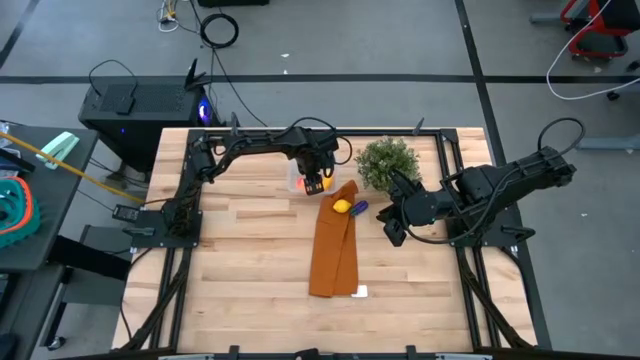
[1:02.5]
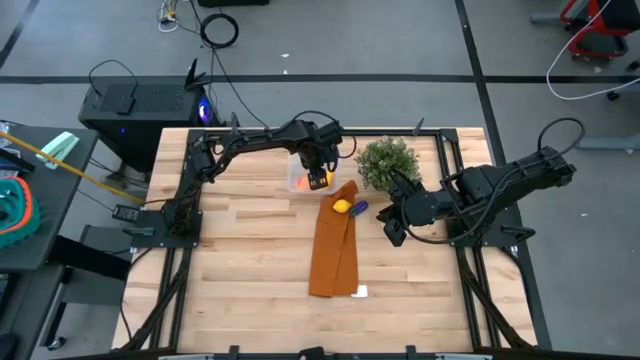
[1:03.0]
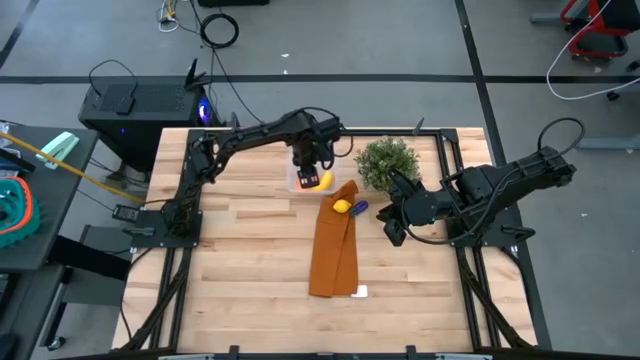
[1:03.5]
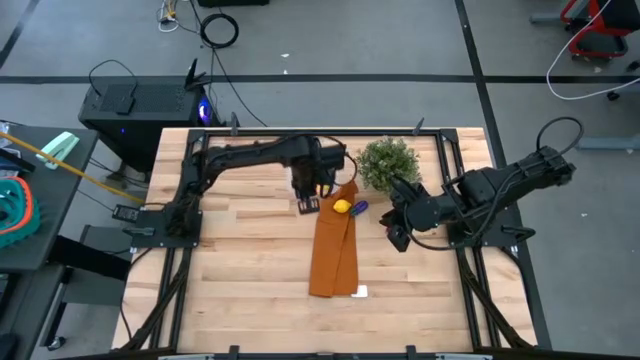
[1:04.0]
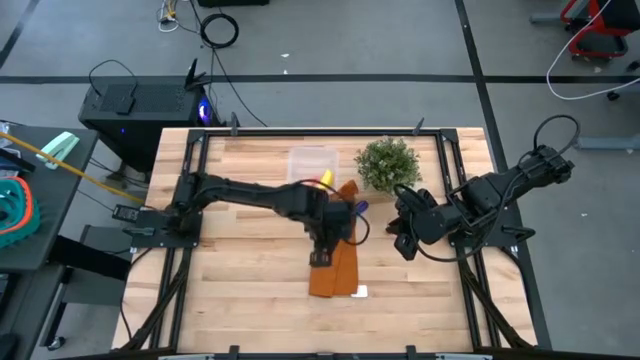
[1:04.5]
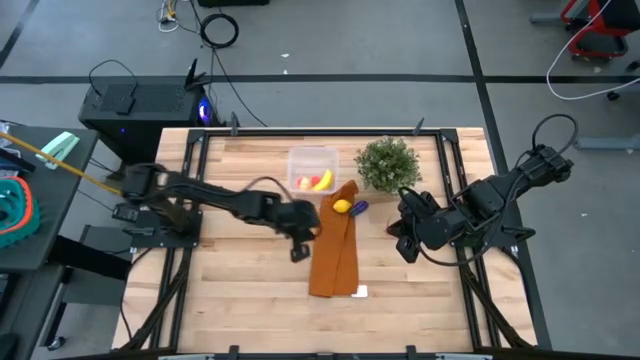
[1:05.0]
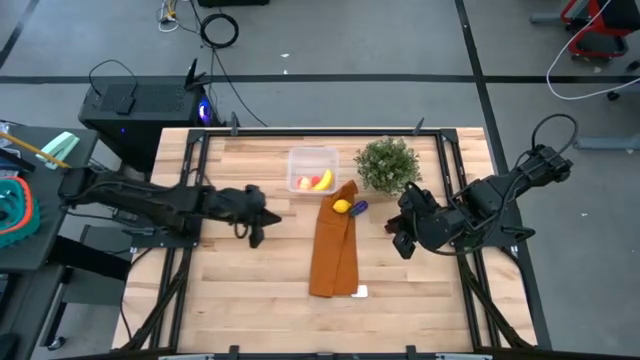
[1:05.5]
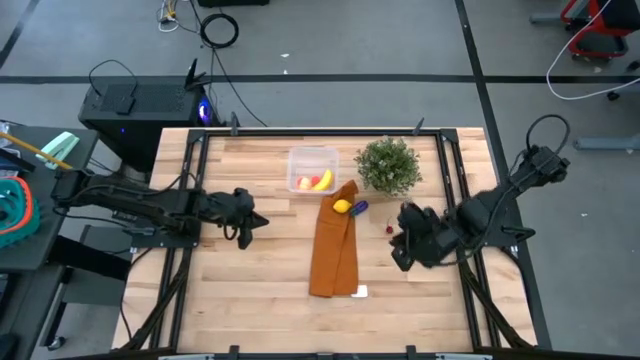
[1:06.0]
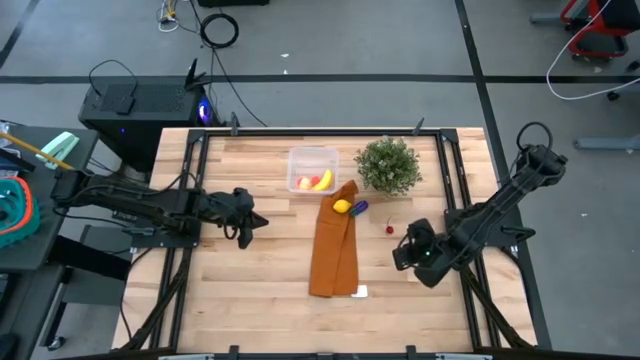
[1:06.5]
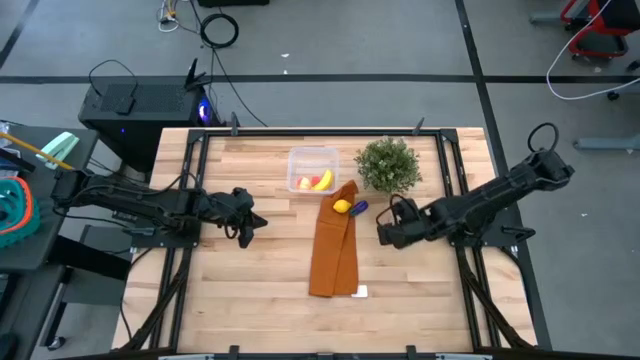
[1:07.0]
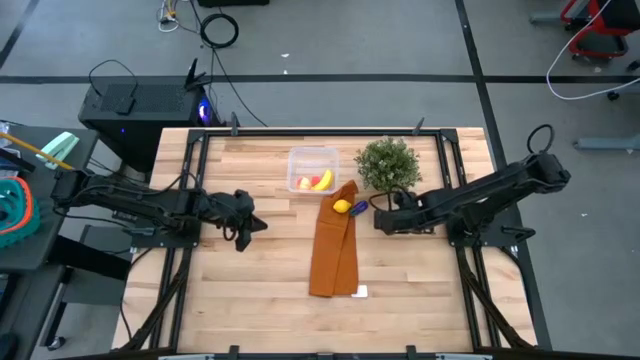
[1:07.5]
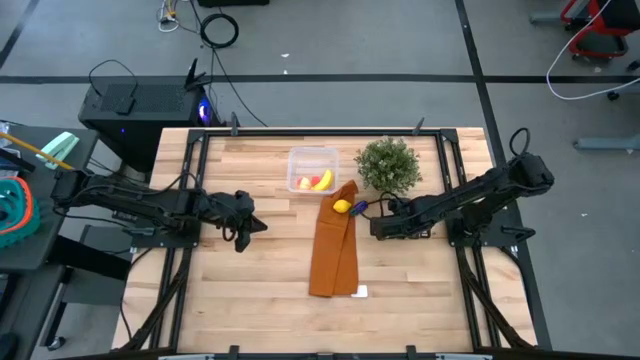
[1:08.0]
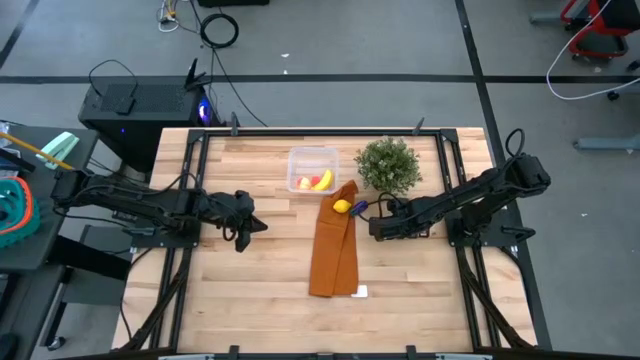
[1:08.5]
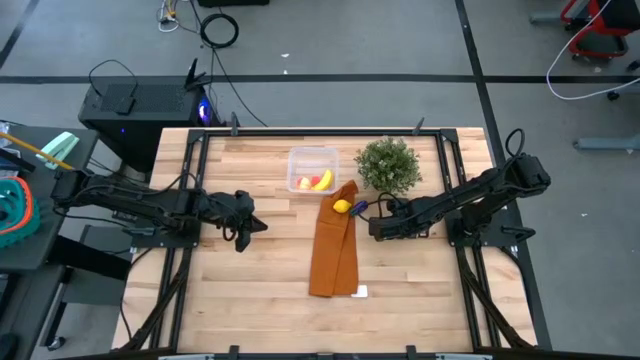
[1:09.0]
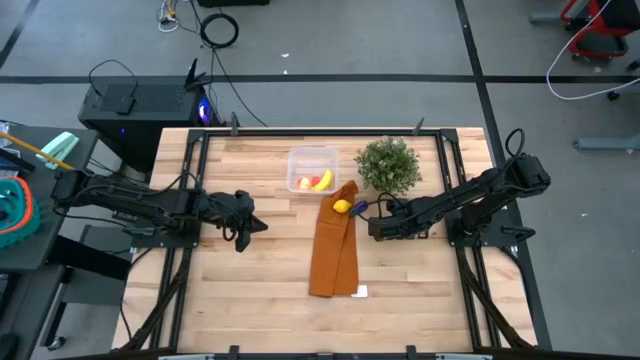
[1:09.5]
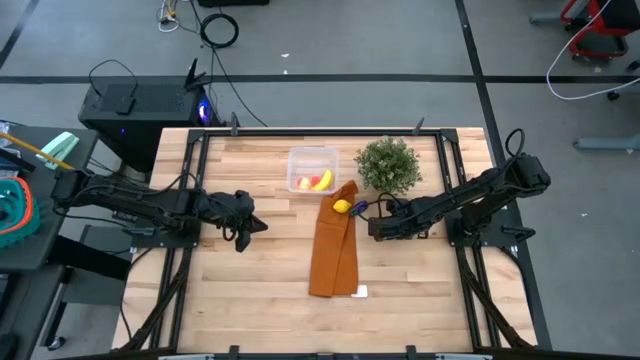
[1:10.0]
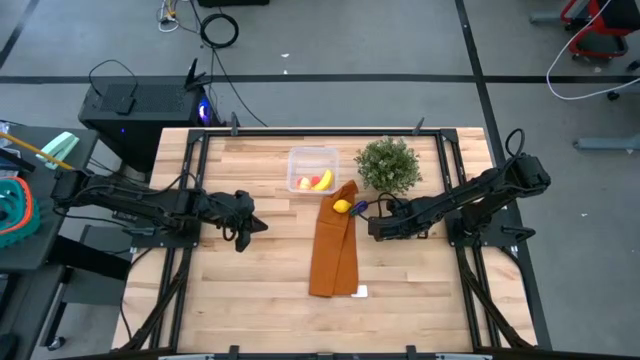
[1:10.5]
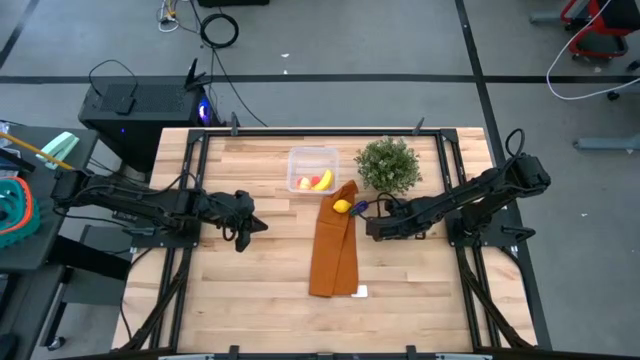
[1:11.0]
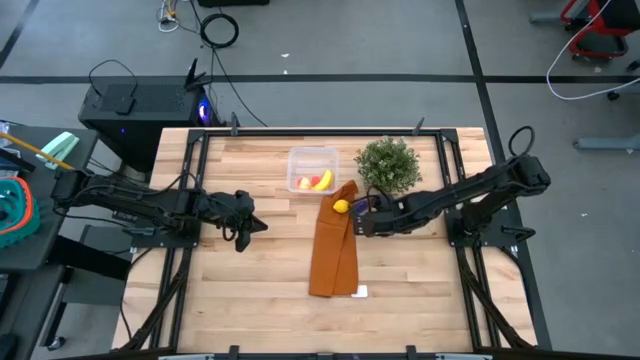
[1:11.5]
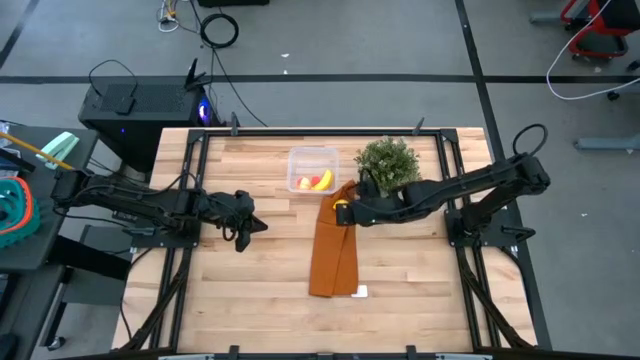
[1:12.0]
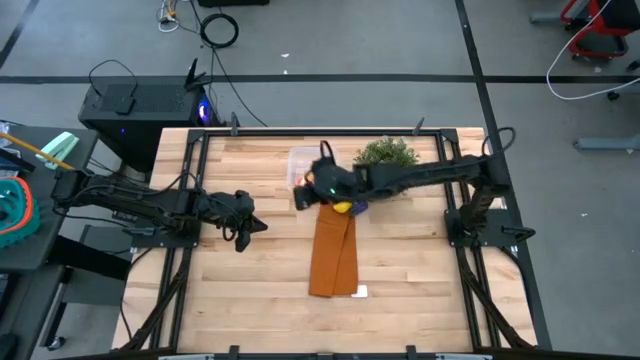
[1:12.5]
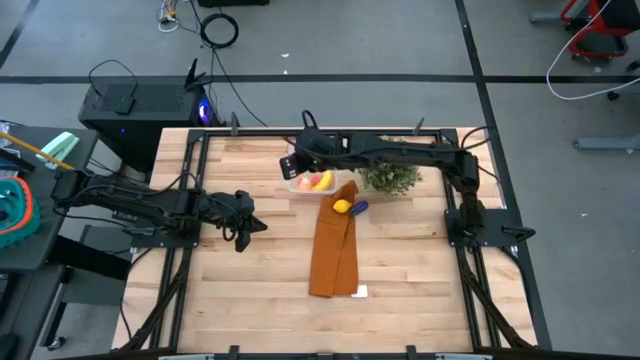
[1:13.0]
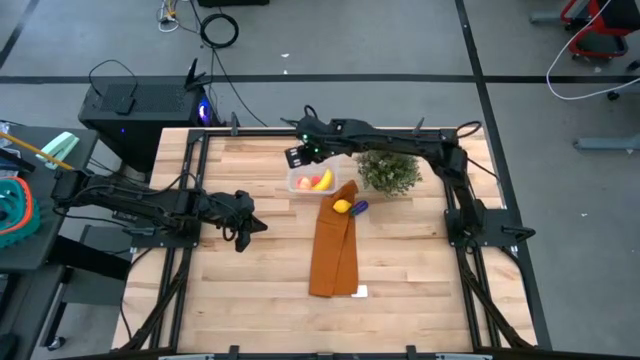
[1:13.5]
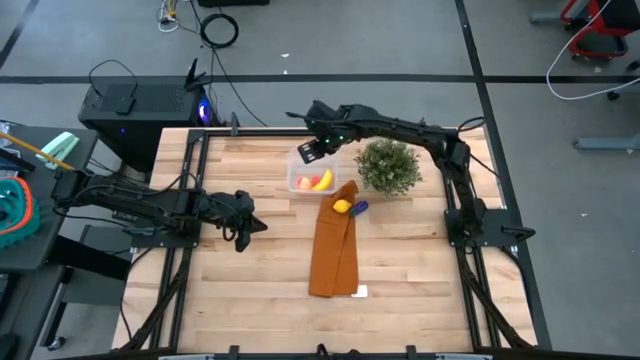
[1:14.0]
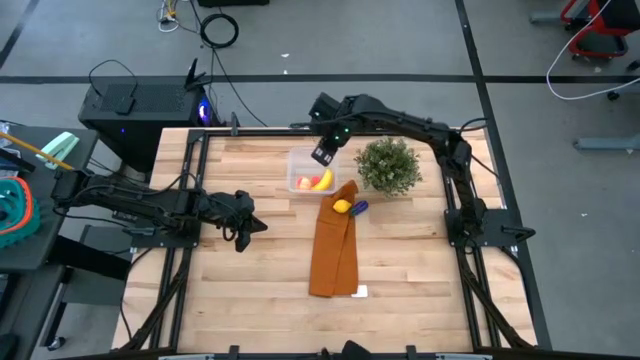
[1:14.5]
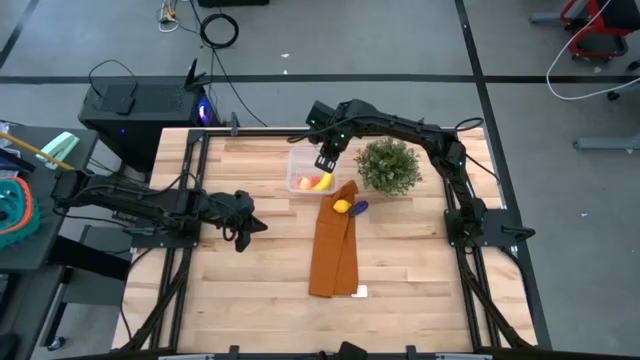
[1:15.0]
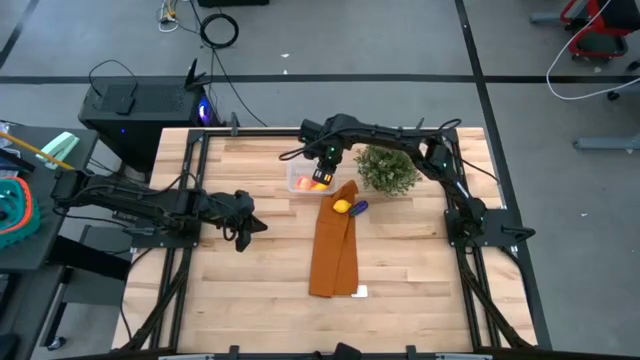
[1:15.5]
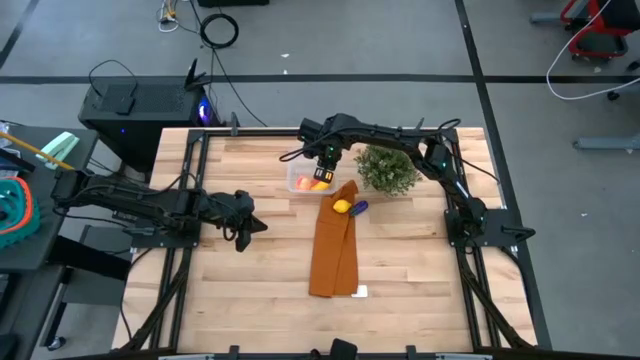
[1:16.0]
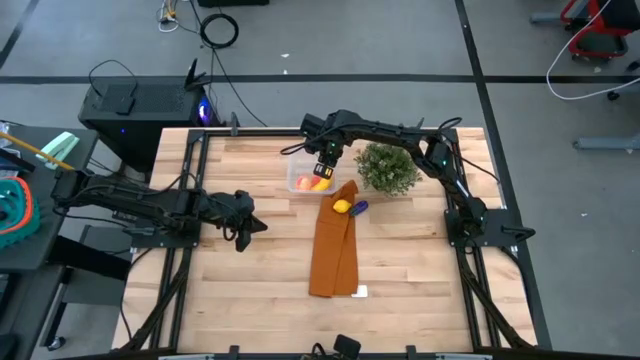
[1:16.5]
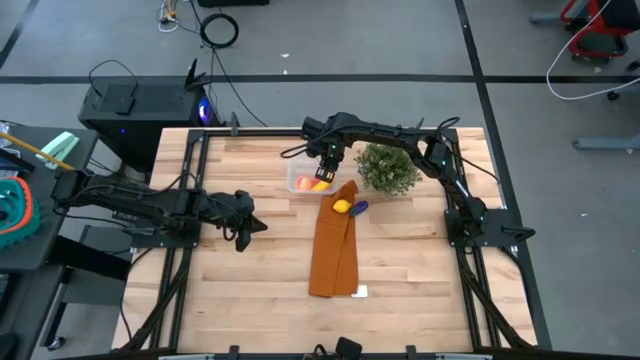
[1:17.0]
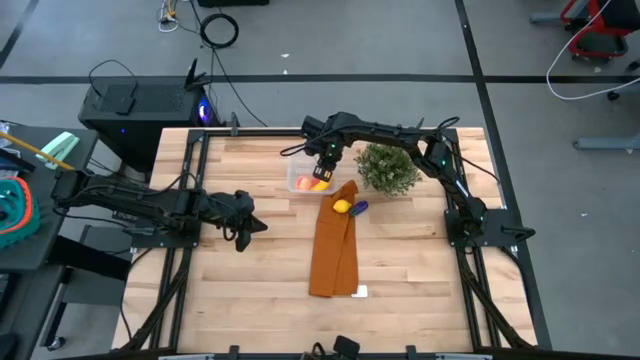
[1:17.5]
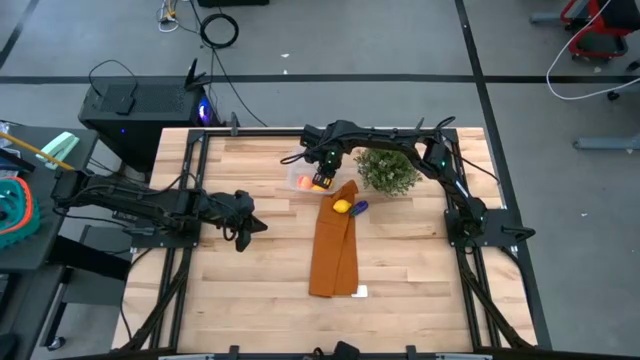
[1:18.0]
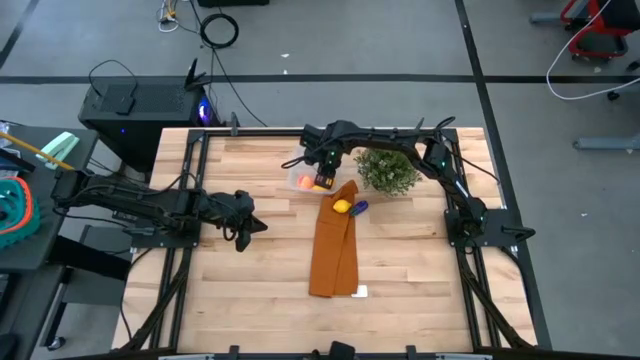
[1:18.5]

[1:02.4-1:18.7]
Task: Pick and placing Produce into tupperware
Put the red cherry into the transparent bin

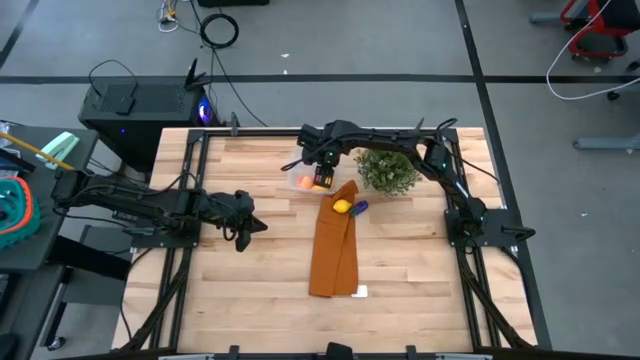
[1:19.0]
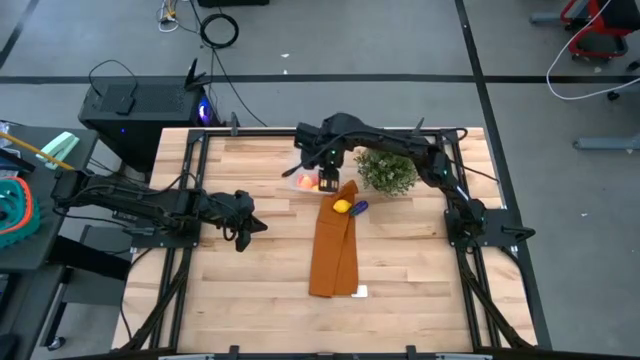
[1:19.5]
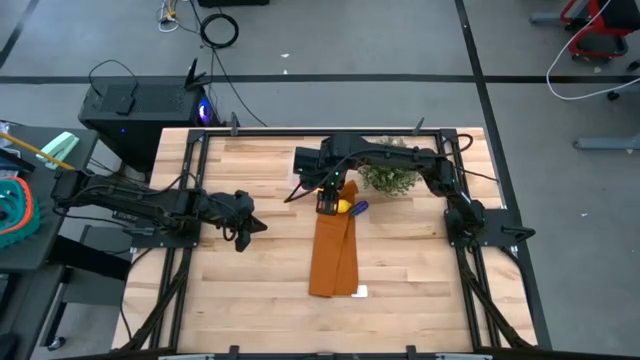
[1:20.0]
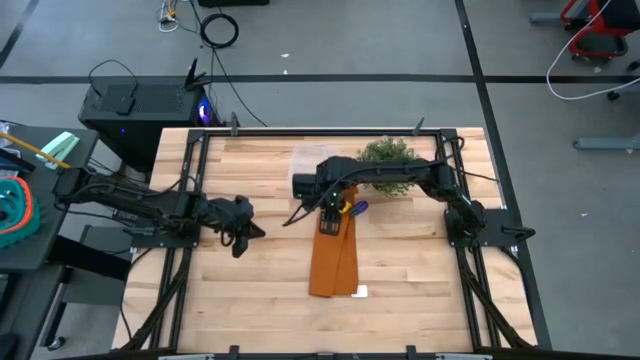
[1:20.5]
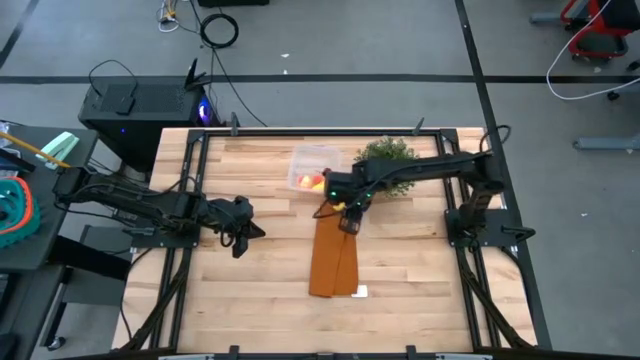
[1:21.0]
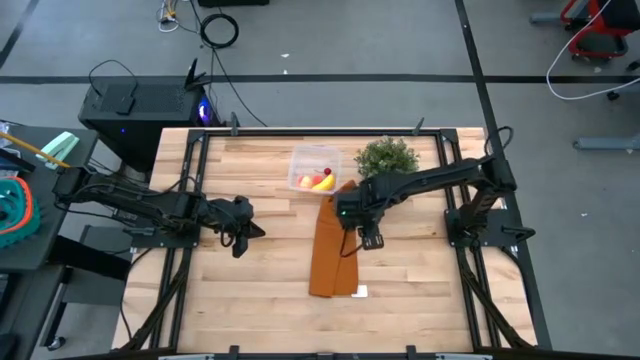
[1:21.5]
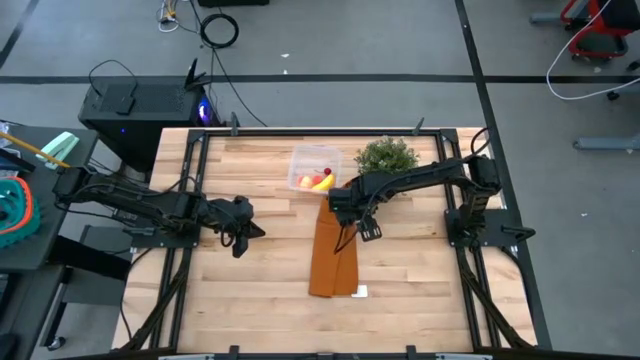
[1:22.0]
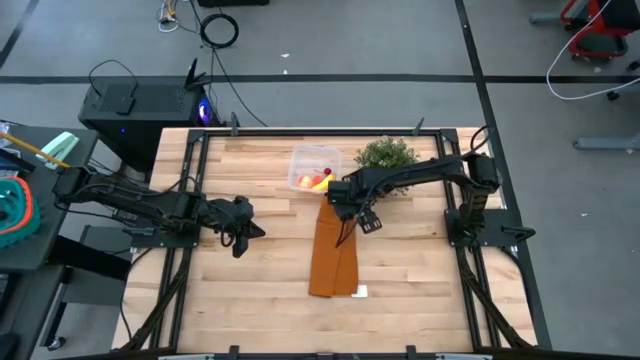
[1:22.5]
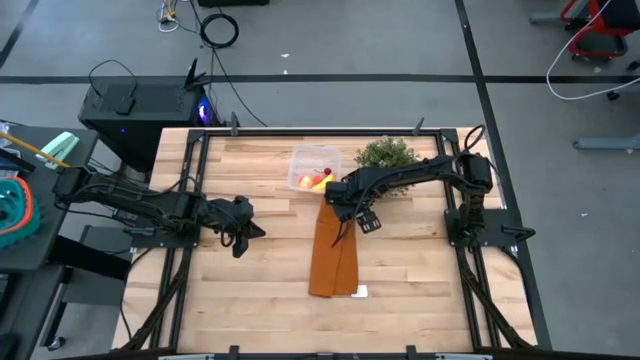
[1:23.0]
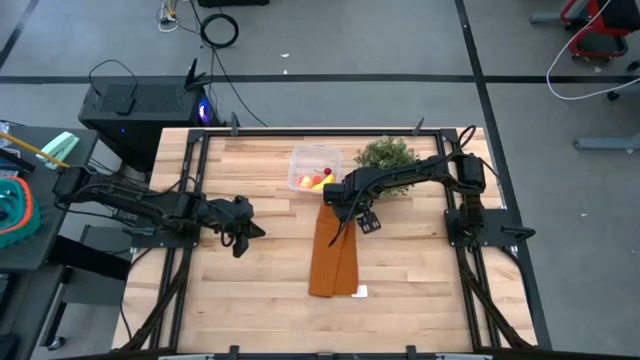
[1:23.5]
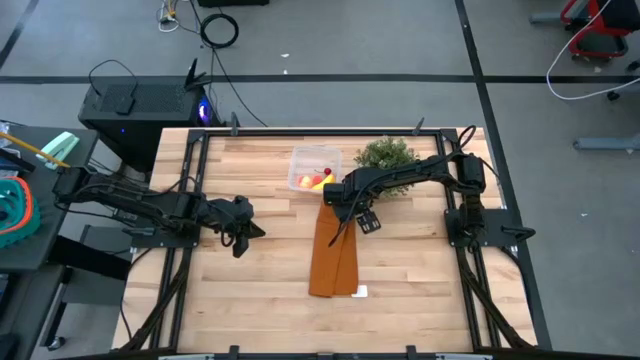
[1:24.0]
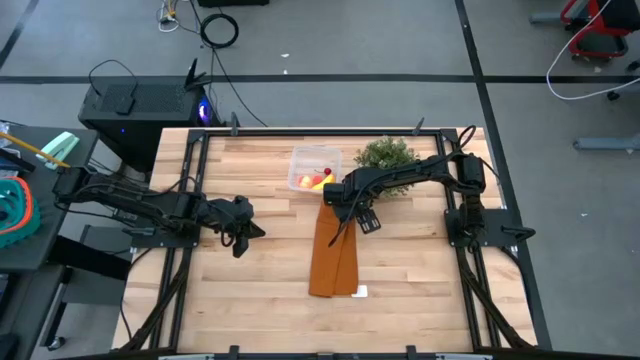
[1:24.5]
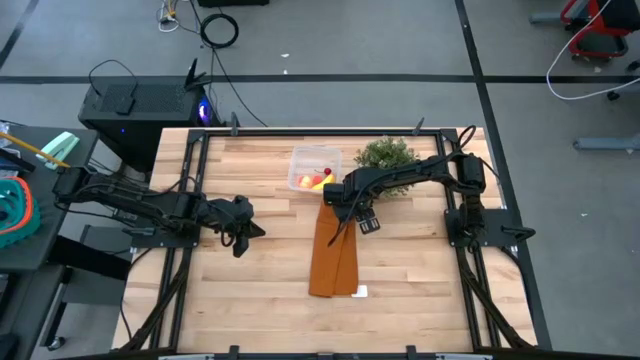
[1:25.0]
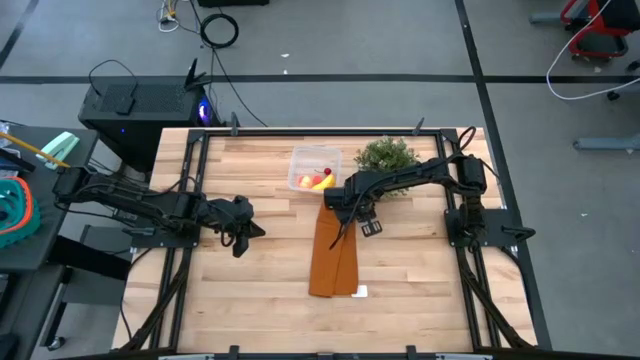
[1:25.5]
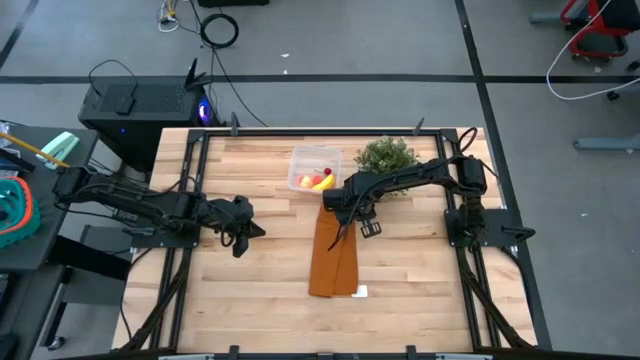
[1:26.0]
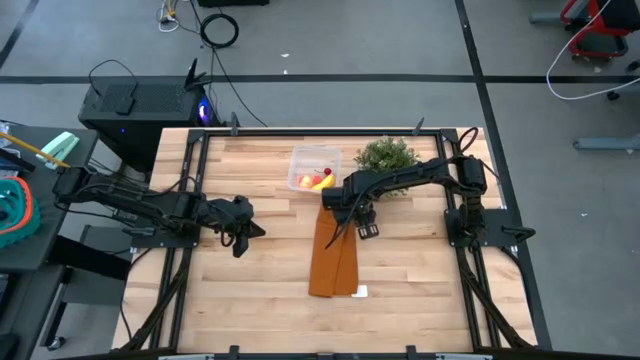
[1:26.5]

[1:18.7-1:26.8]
Put the purple eggplant into the transparent bin
